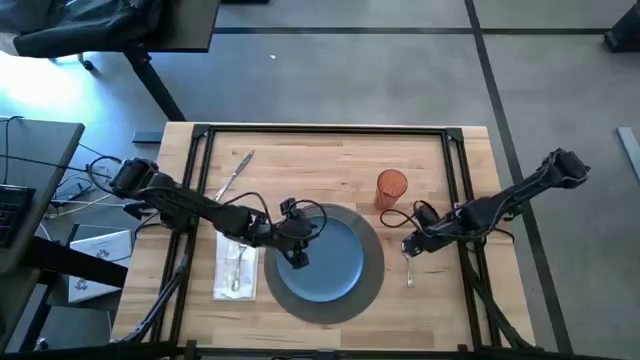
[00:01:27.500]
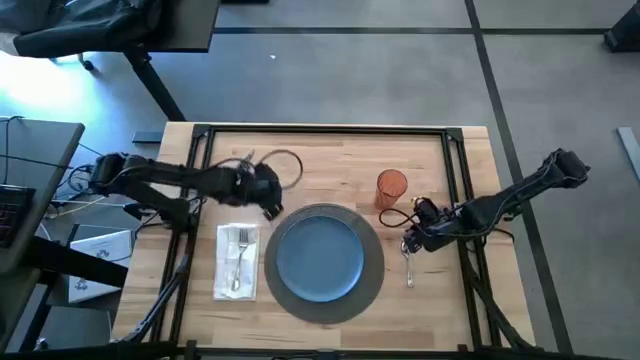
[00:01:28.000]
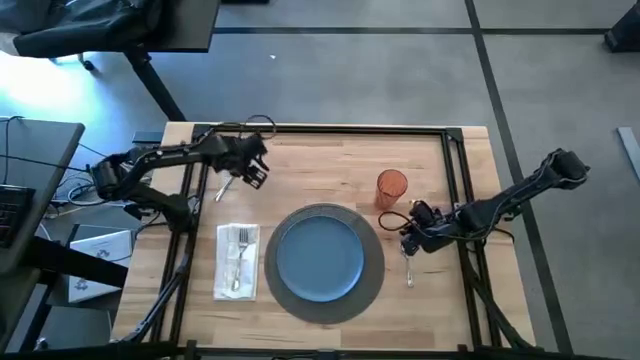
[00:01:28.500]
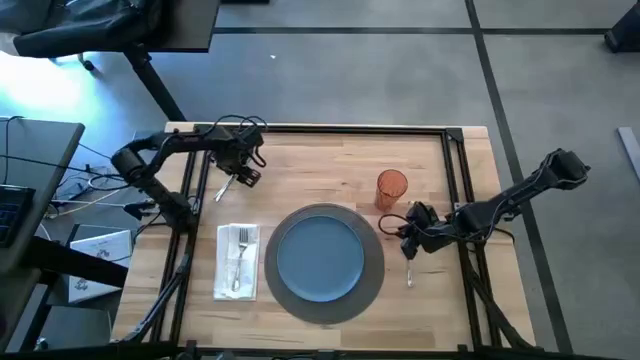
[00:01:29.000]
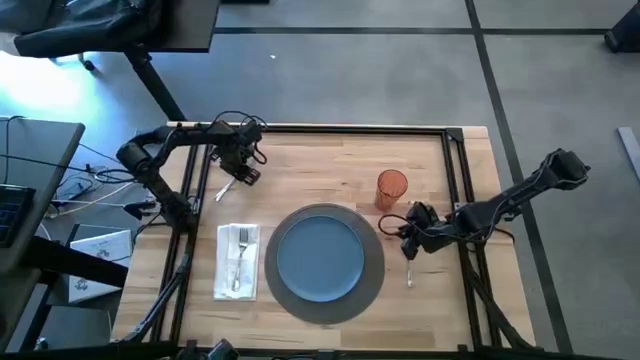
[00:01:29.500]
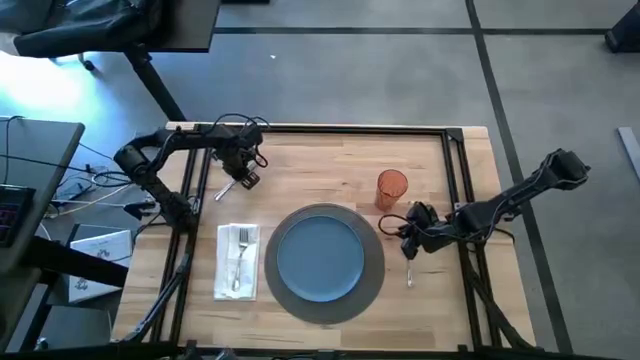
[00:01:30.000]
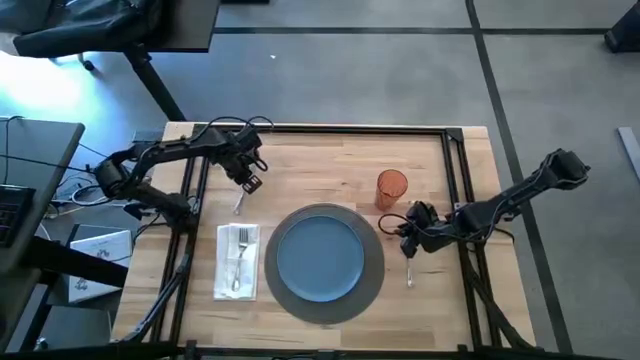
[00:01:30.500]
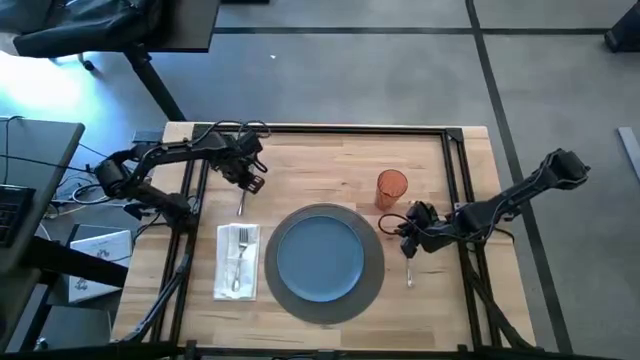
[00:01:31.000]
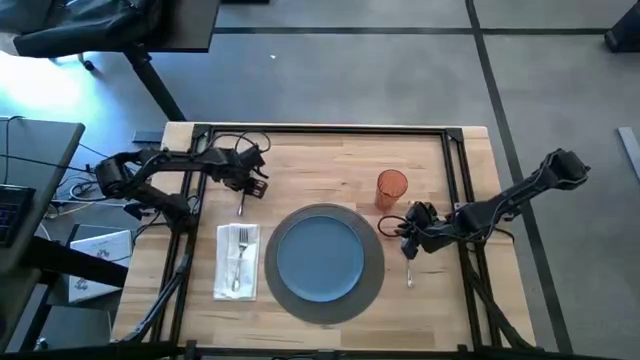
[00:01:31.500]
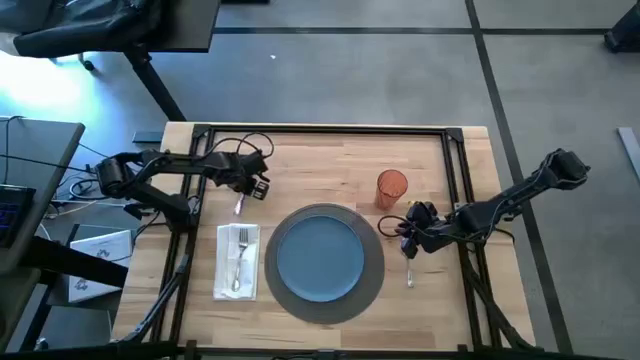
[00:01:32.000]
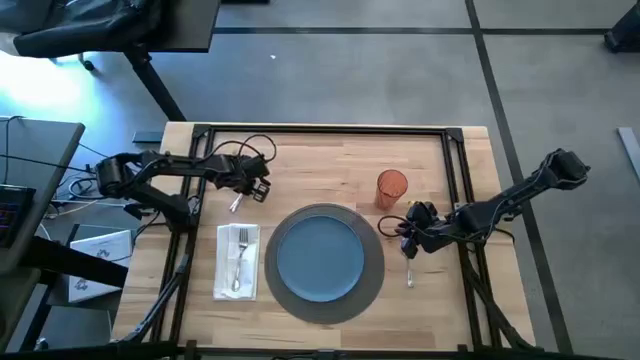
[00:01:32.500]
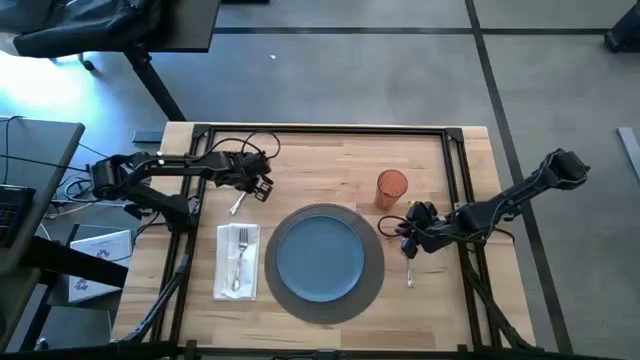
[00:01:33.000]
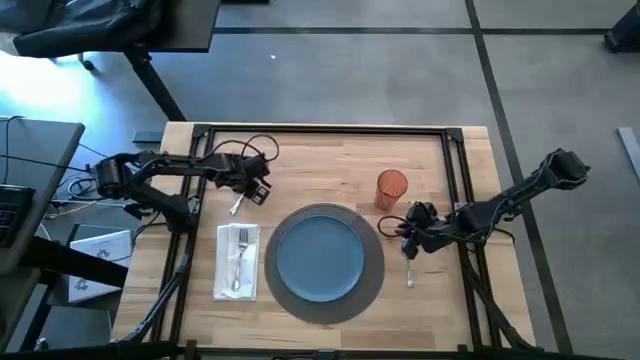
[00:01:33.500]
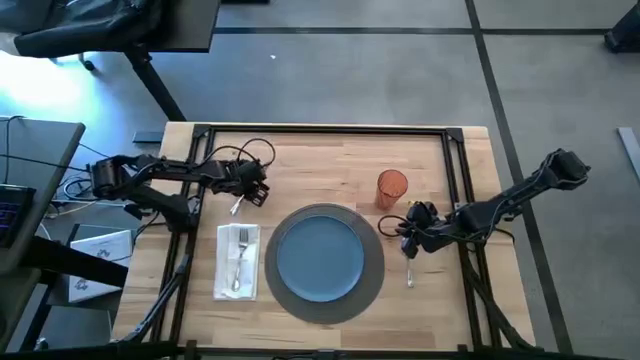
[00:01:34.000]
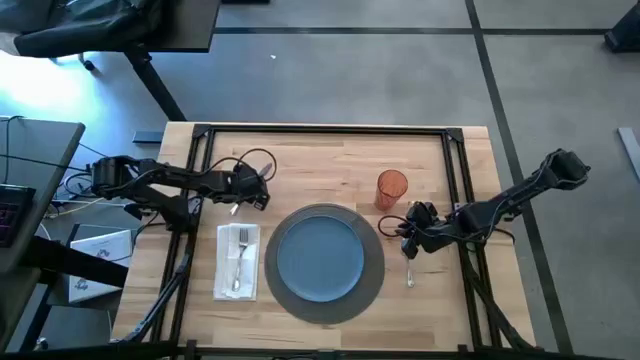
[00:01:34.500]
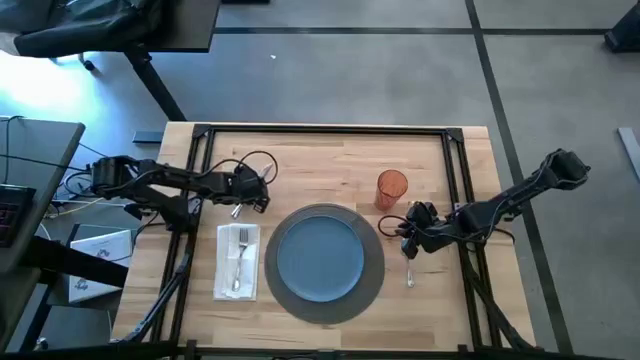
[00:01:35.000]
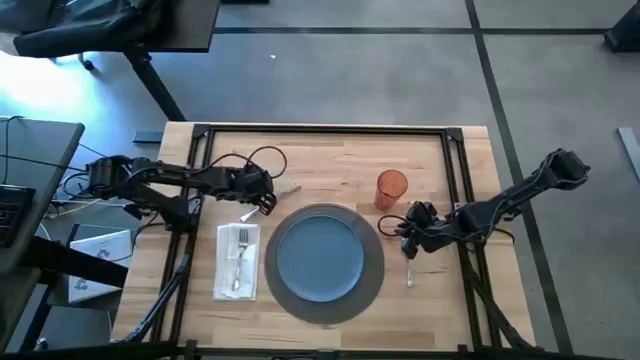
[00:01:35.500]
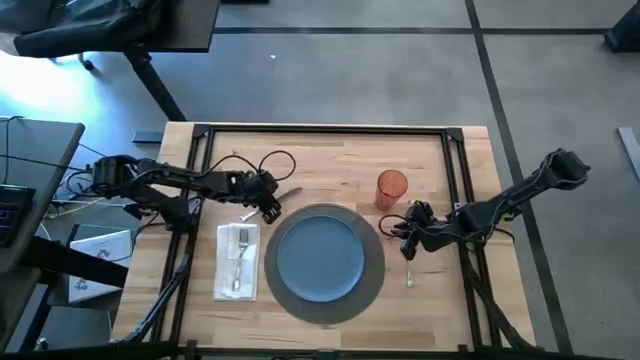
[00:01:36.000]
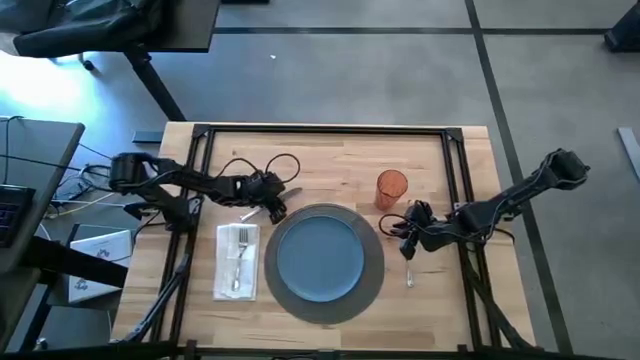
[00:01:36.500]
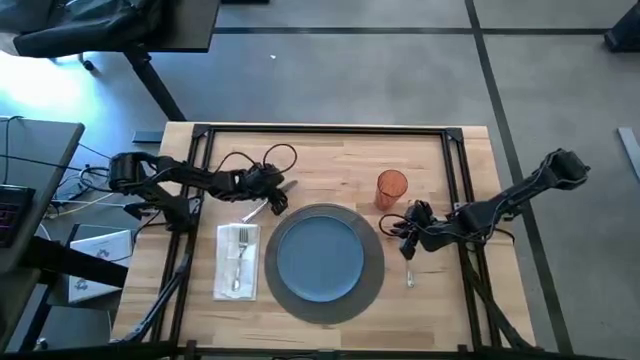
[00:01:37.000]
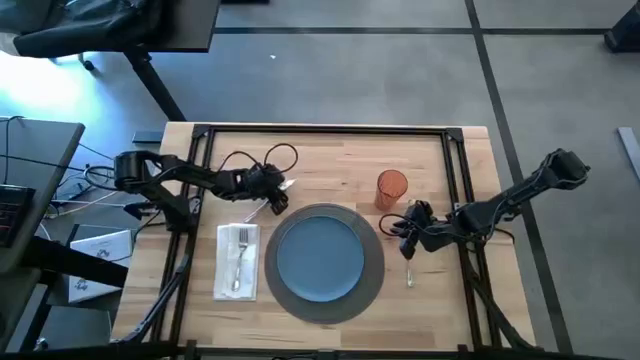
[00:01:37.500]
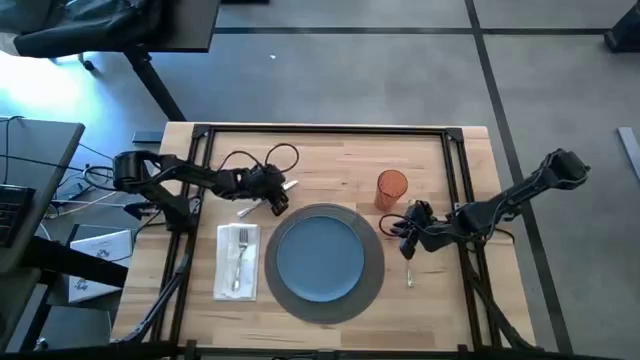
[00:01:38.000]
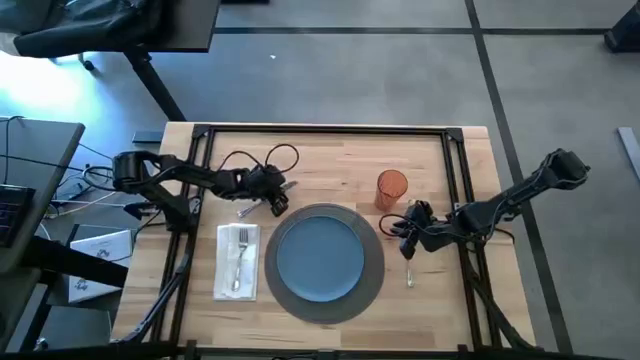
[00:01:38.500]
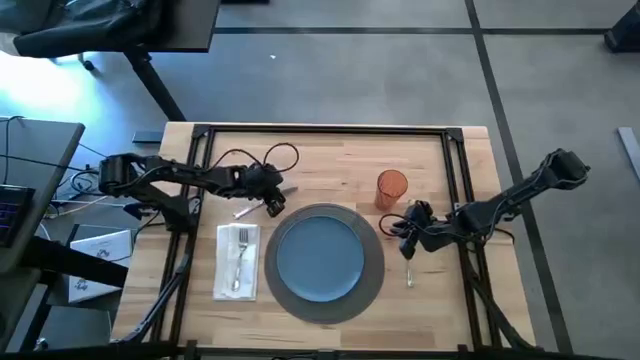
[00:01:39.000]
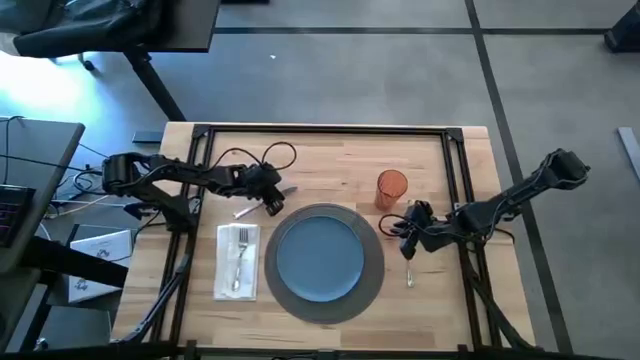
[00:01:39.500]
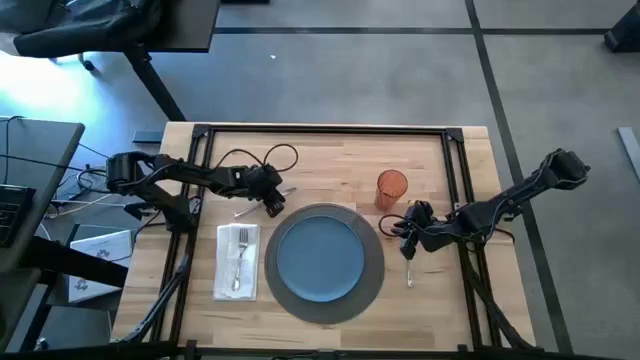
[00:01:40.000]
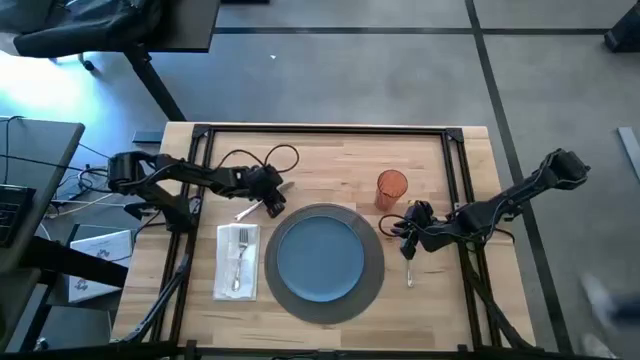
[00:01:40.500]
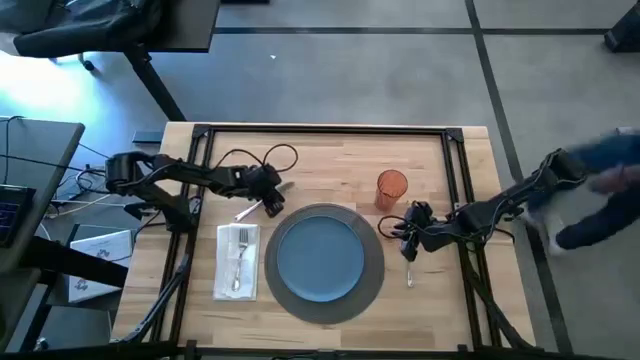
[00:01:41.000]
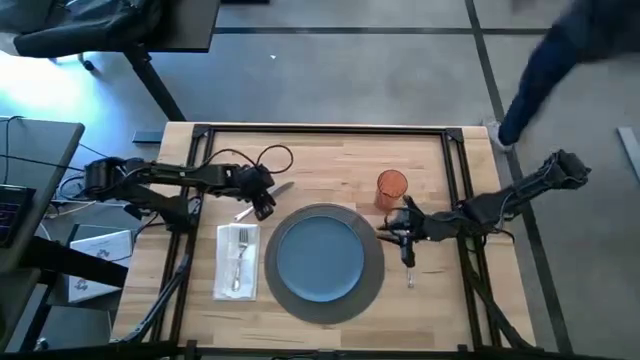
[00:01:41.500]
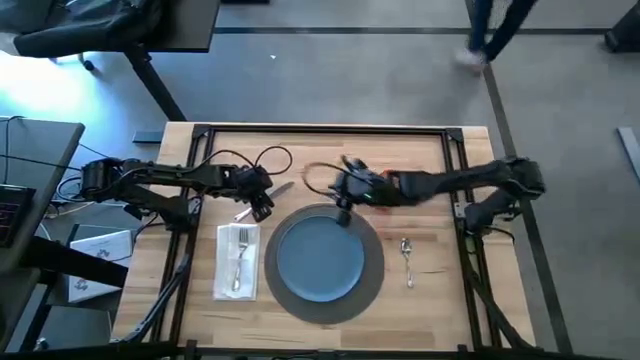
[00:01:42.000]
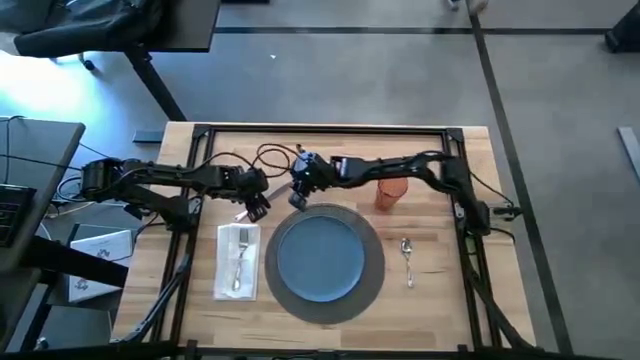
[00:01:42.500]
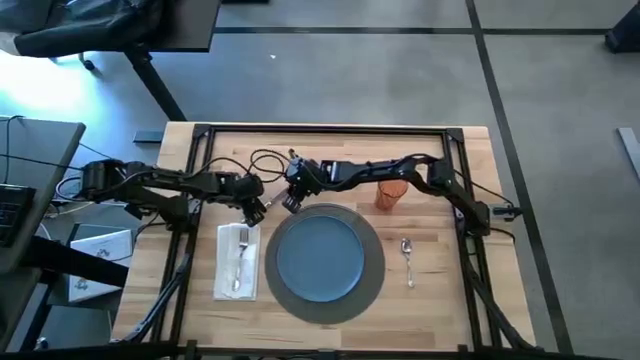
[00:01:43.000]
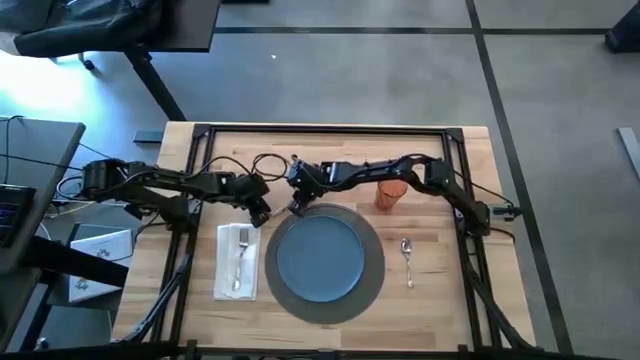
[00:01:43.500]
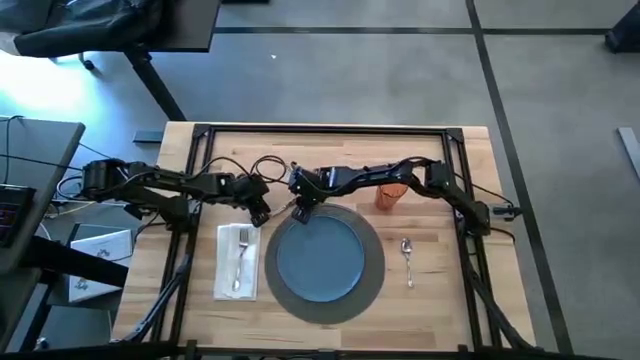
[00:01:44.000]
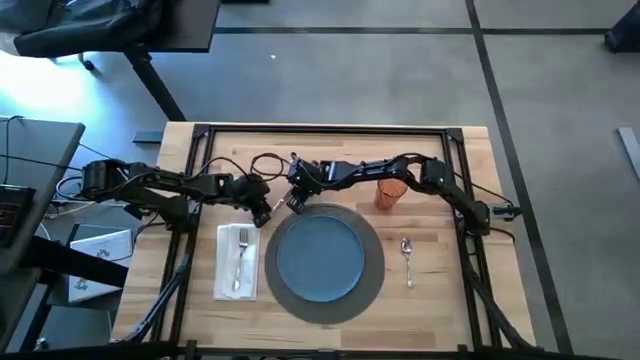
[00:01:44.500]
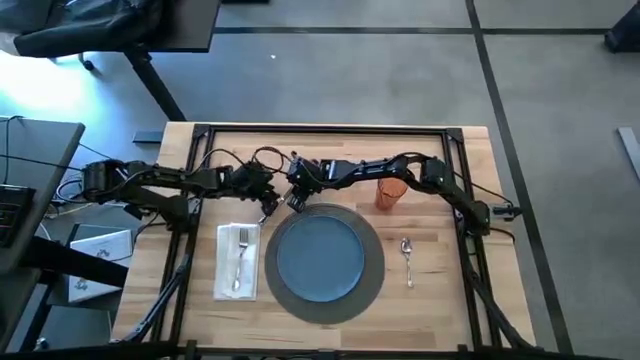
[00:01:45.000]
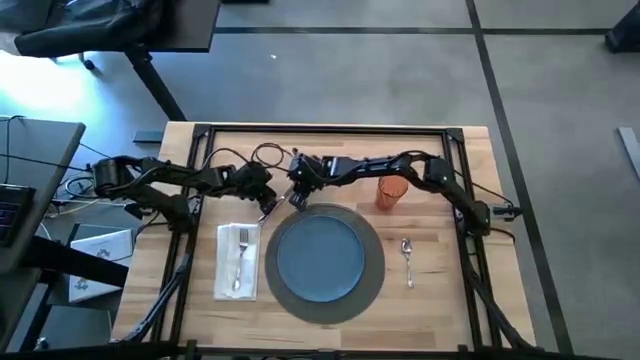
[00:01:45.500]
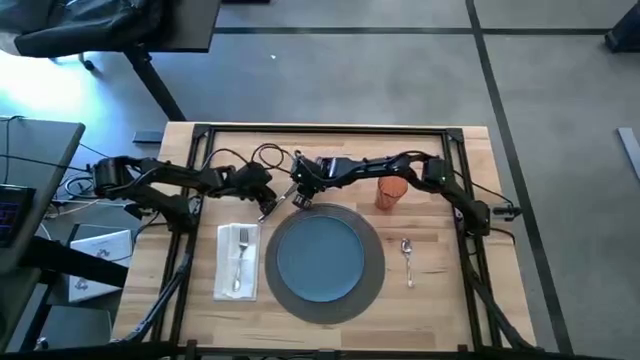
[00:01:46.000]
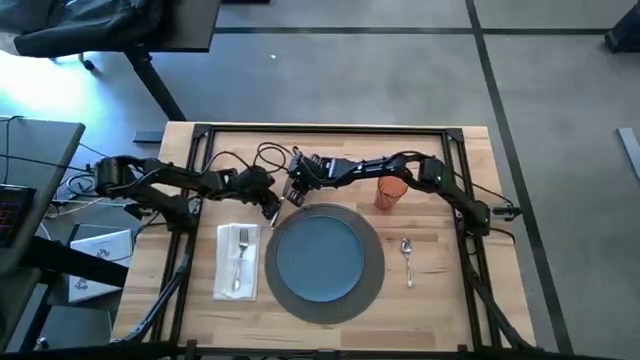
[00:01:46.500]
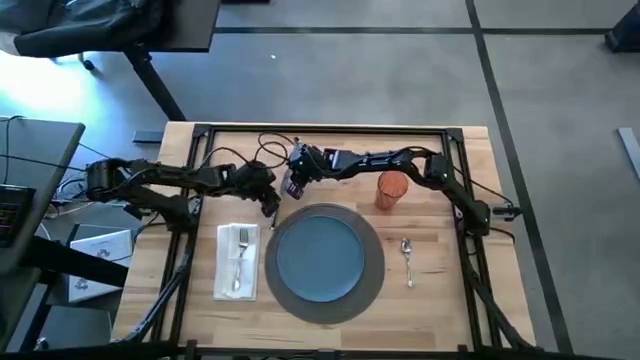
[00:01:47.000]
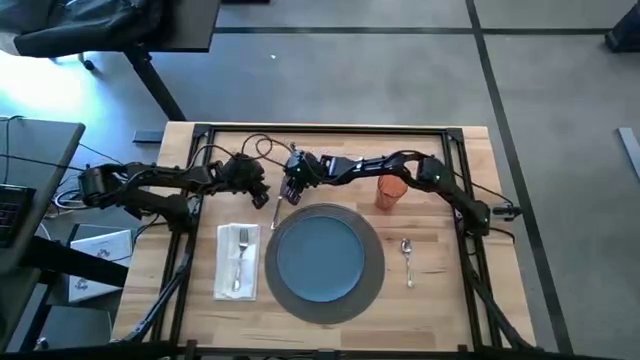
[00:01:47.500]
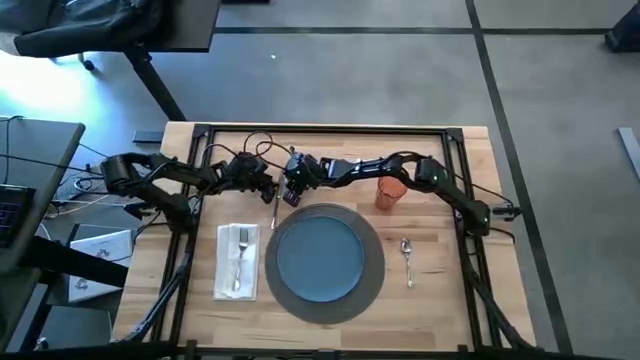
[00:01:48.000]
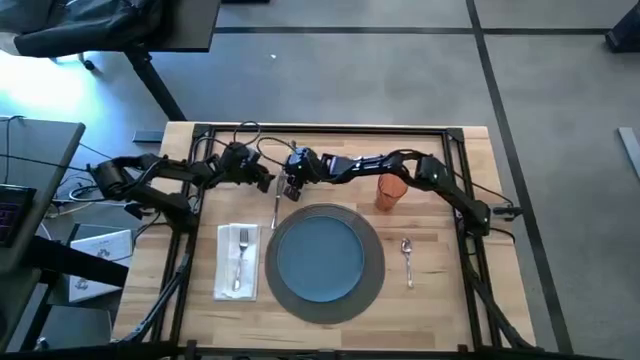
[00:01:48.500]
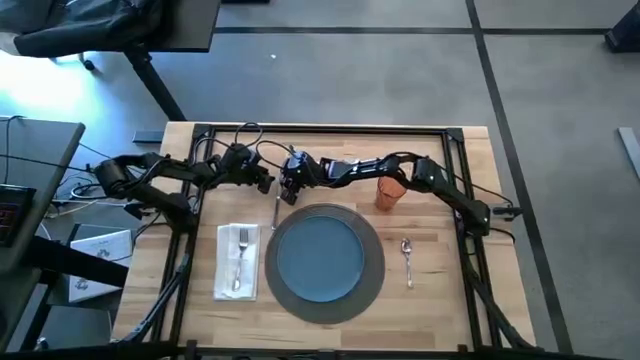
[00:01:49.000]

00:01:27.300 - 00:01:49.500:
Task: Set table place
Put the silver table knife to the right of the gray table mat
